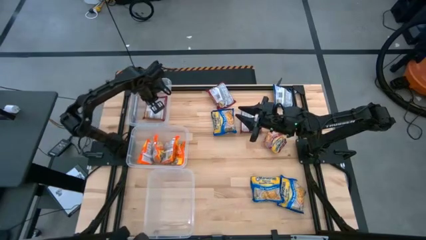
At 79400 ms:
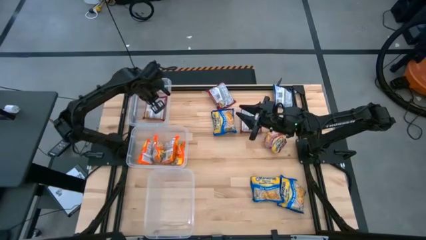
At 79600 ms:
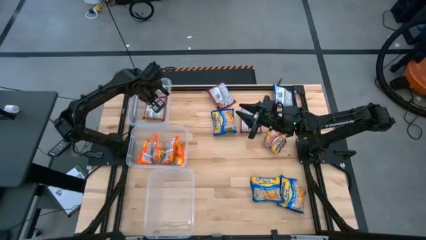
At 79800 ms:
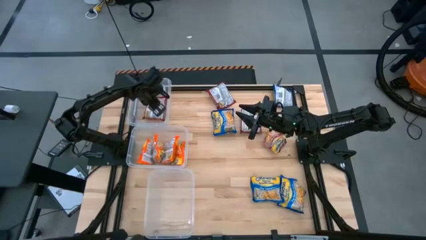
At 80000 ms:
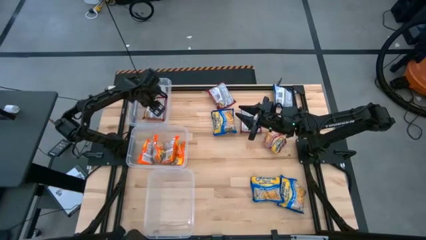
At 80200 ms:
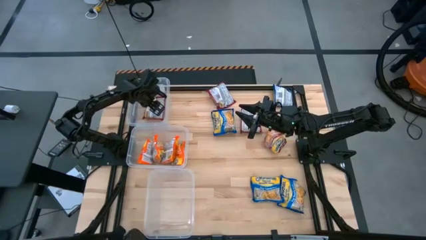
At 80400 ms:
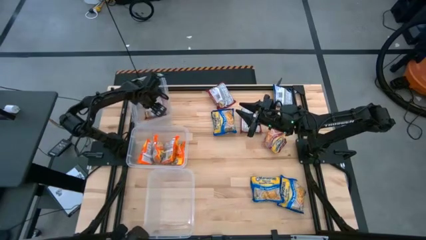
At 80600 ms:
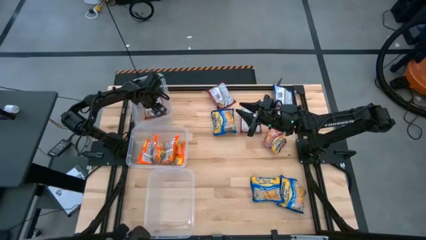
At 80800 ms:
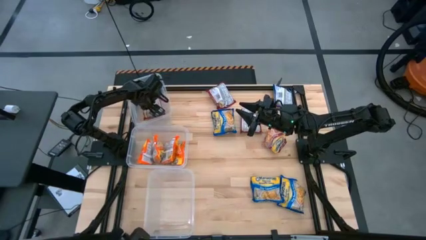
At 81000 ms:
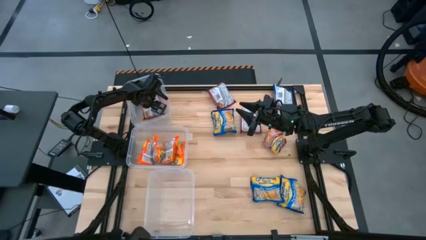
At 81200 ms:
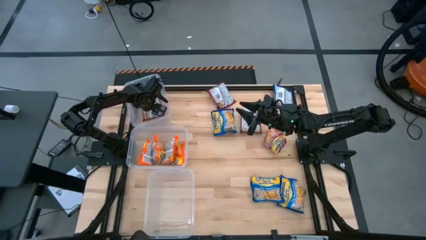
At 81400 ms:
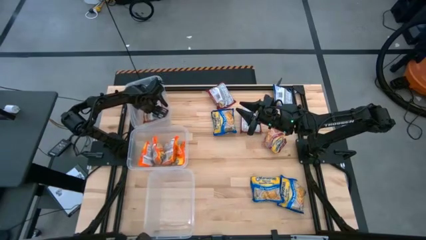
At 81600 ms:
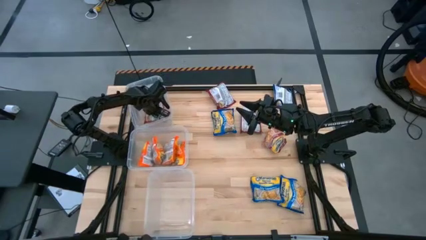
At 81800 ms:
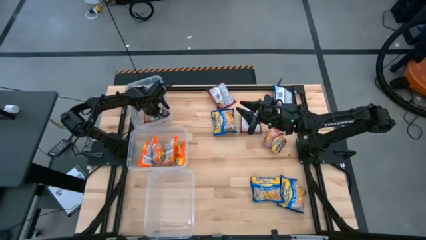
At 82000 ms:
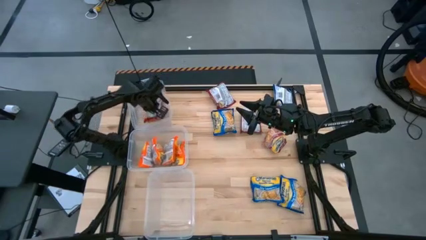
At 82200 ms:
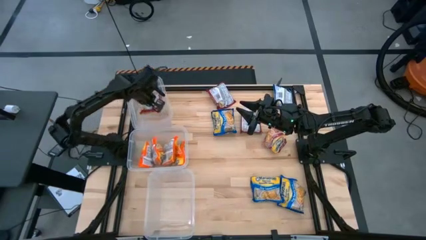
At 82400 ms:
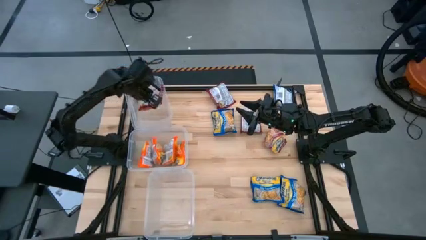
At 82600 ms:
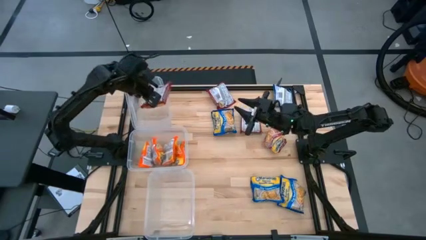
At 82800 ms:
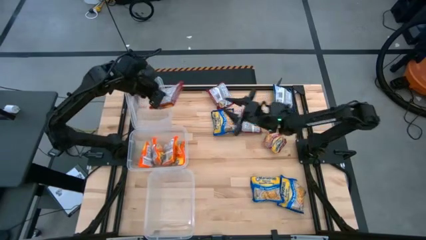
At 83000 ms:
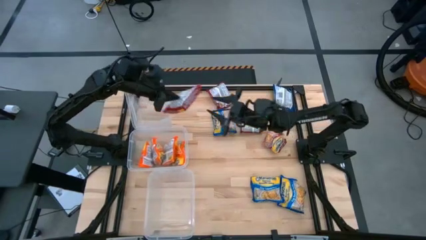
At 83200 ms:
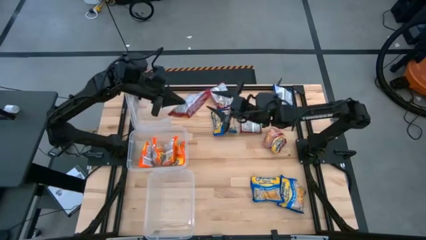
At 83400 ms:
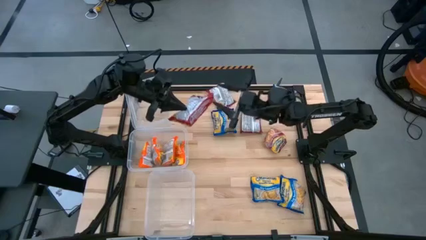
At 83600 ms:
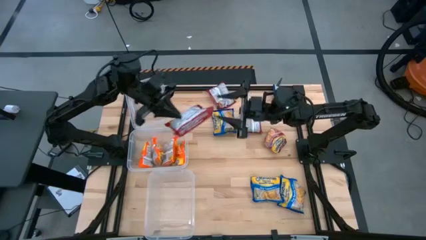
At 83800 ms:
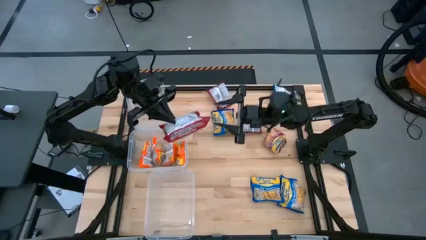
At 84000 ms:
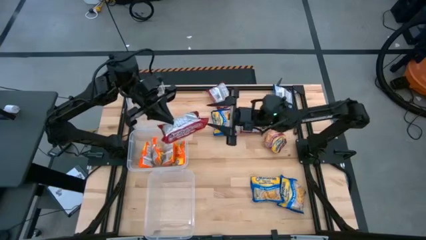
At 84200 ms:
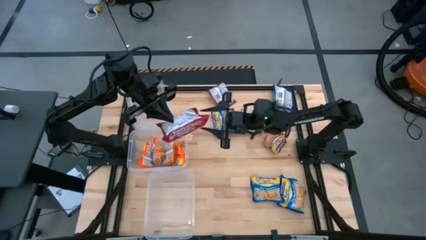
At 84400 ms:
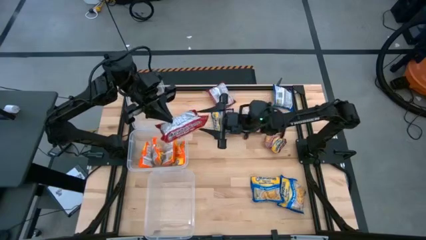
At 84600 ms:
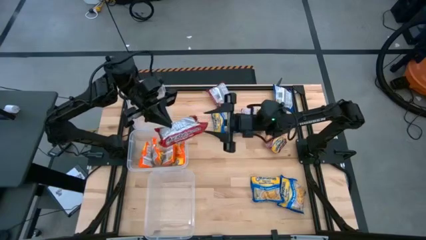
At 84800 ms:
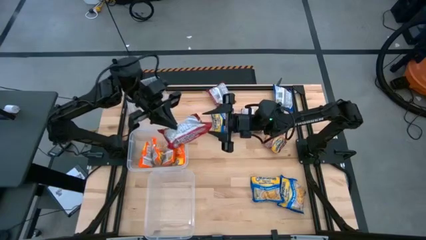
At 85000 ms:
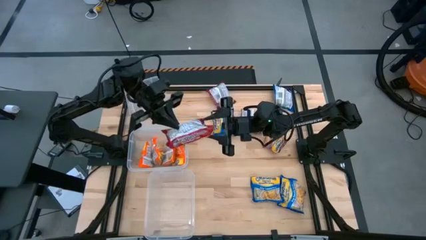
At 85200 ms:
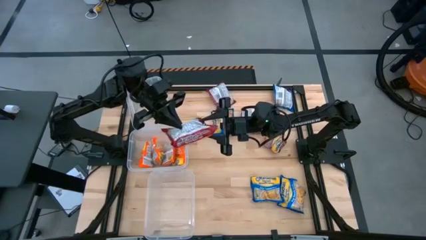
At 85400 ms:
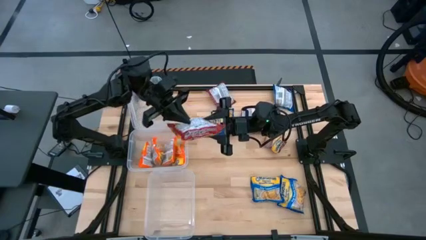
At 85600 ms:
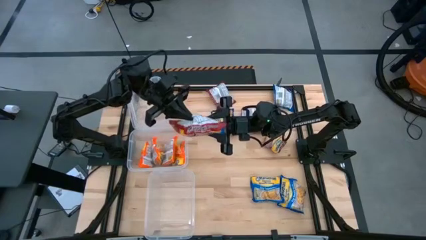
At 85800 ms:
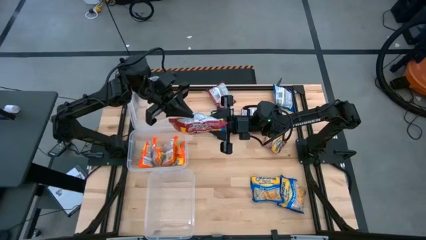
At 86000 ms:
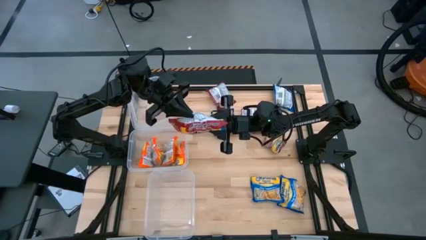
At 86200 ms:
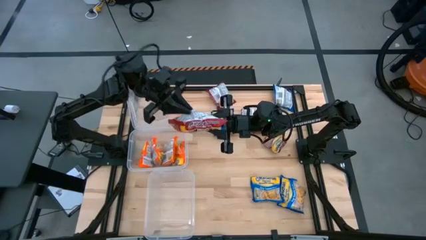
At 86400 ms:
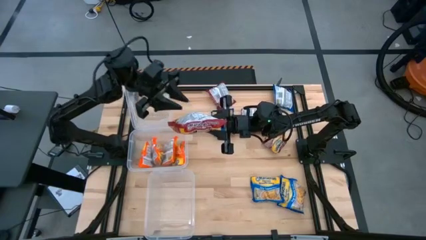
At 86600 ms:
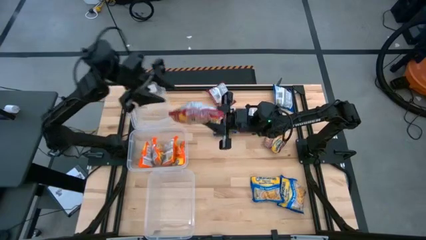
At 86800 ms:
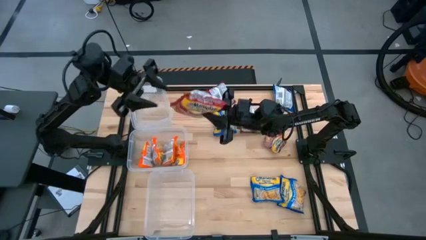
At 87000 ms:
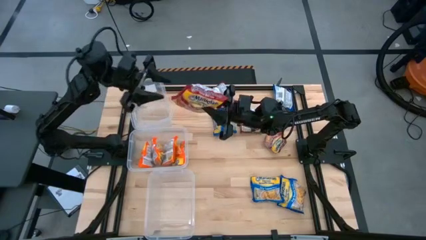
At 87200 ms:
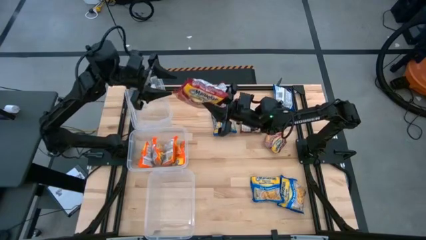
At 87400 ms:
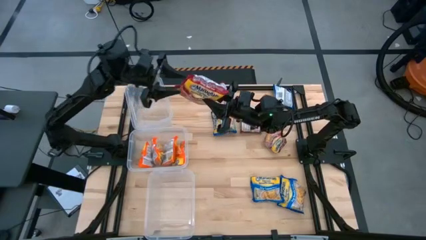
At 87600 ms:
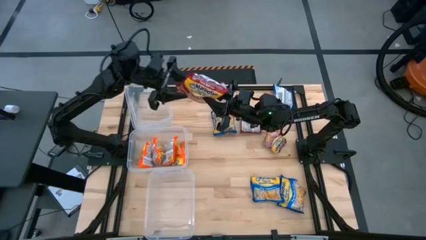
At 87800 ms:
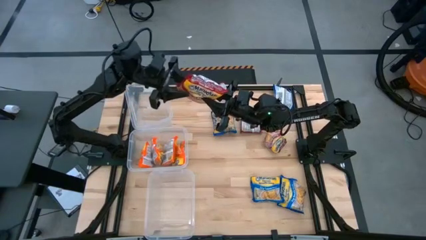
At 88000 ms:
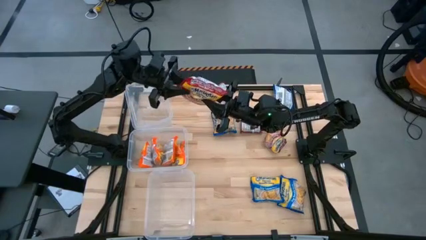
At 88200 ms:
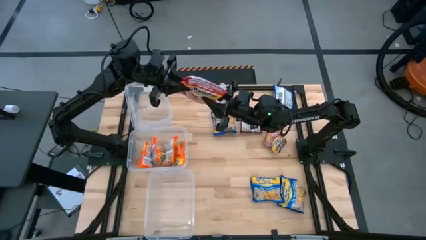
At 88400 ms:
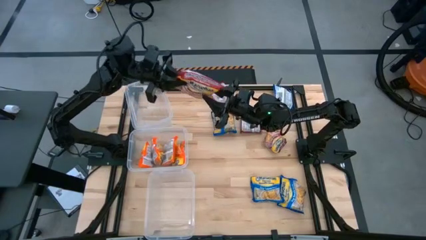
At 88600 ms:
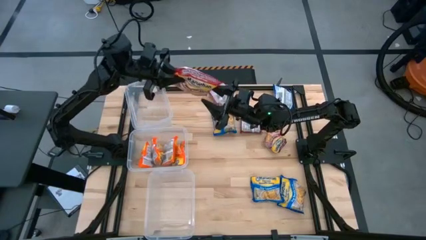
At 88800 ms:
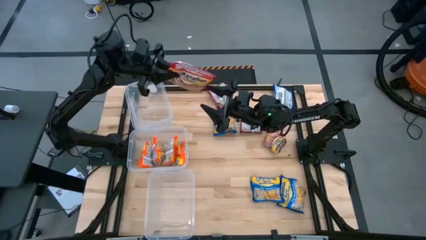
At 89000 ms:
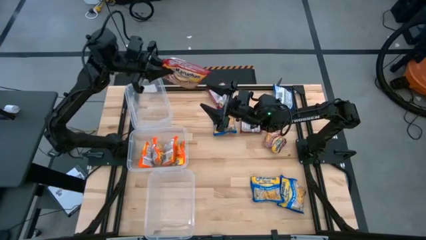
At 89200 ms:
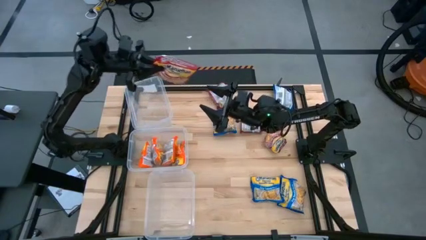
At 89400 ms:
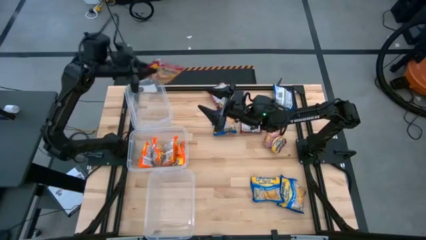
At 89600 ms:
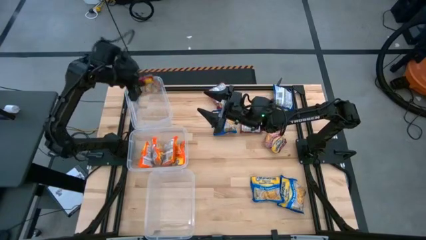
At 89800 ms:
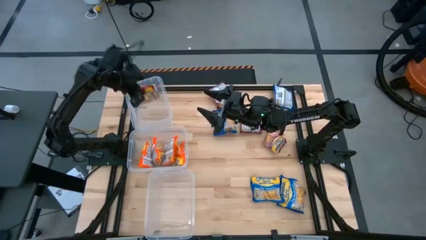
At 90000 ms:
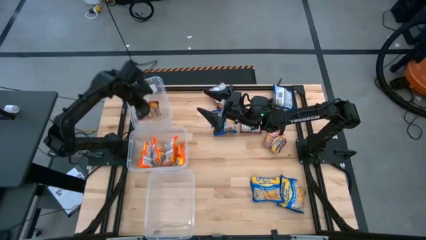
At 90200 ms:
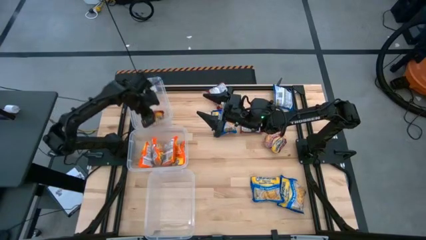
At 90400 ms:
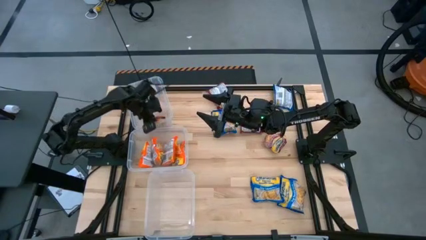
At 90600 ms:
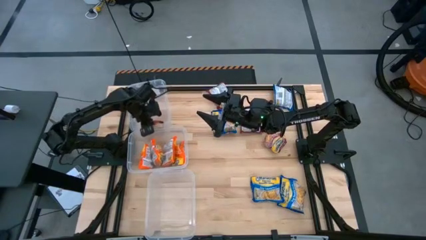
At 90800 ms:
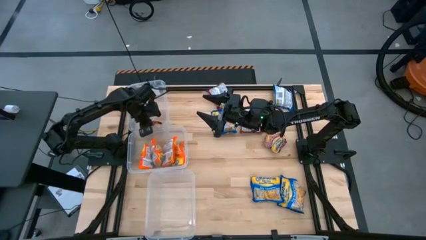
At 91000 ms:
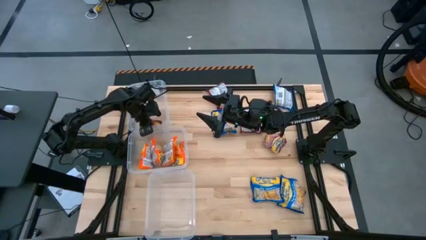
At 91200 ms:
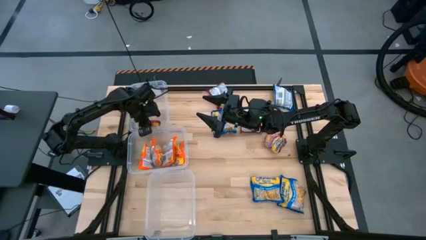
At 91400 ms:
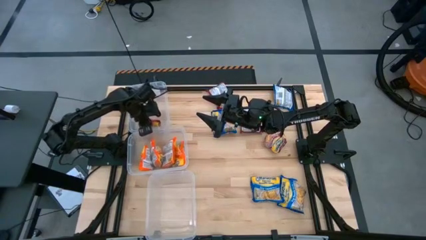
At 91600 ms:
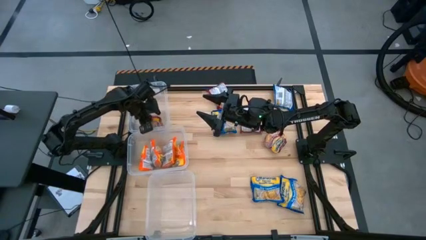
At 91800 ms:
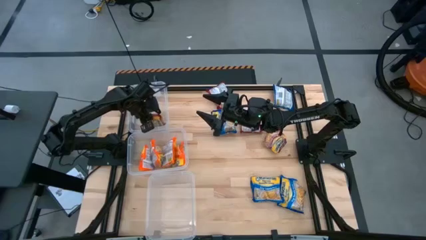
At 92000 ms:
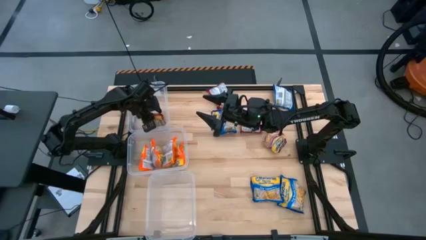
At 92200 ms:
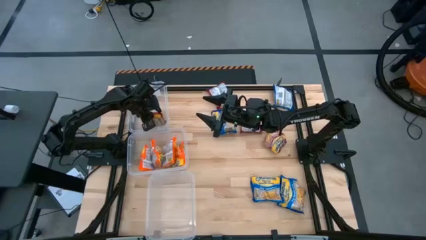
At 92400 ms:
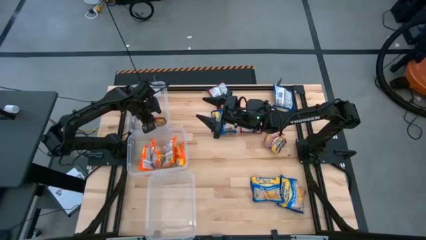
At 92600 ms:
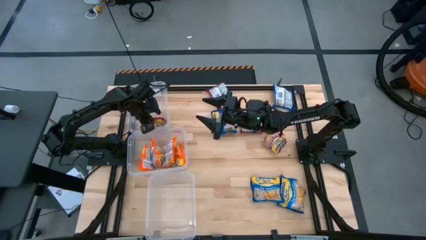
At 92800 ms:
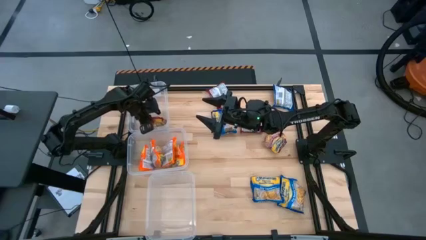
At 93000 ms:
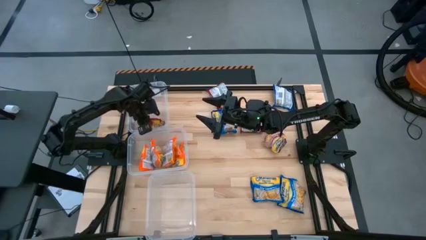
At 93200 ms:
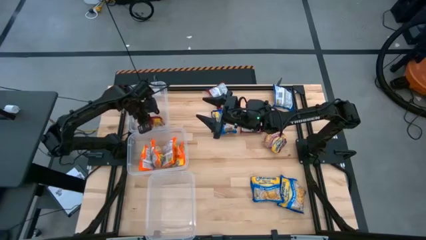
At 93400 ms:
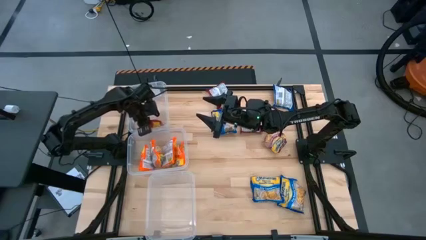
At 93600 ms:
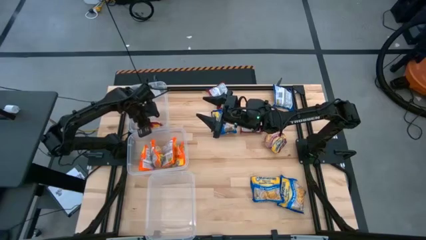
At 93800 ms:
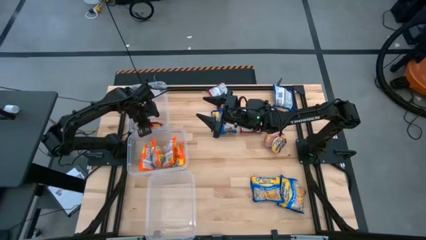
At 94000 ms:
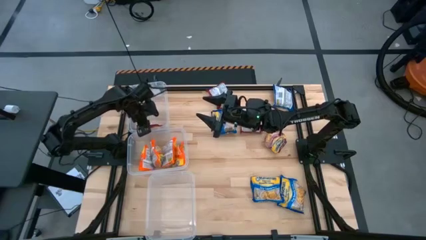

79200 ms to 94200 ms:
Task: Sort Maruchan noodles
Adjust the red noodle pack in the top transparent bin

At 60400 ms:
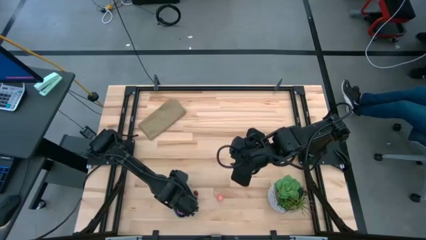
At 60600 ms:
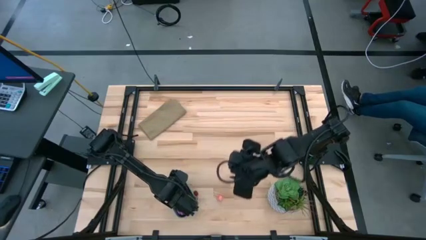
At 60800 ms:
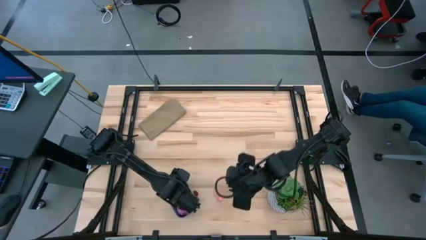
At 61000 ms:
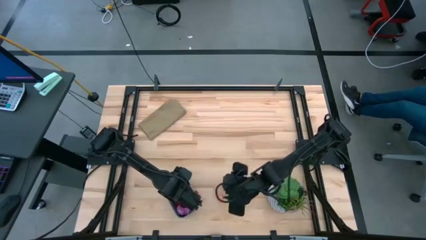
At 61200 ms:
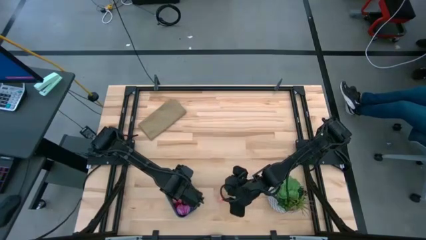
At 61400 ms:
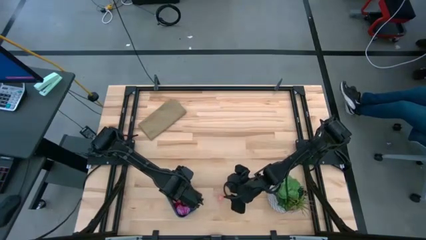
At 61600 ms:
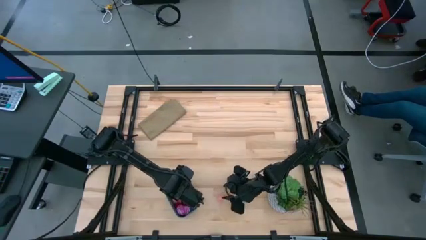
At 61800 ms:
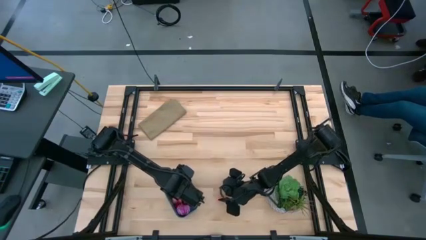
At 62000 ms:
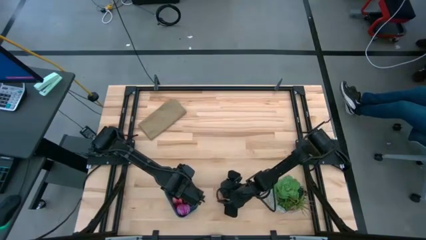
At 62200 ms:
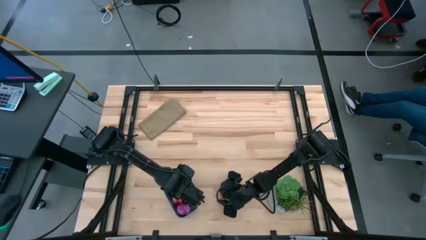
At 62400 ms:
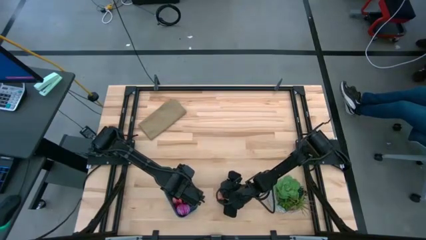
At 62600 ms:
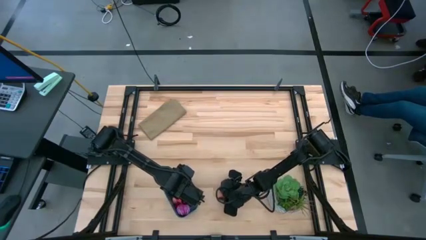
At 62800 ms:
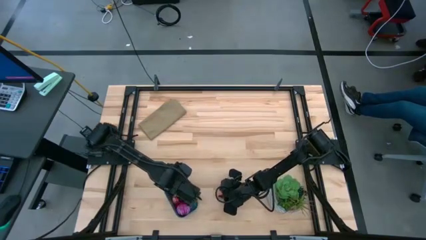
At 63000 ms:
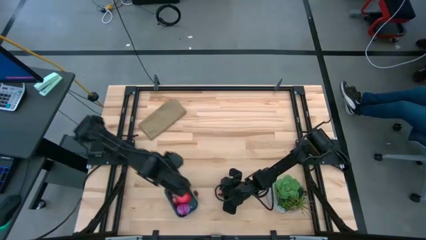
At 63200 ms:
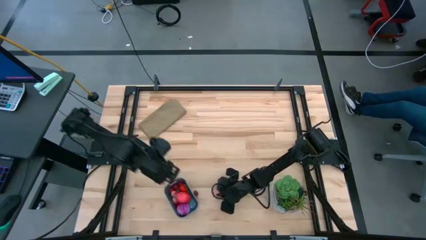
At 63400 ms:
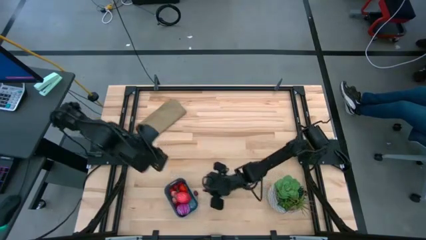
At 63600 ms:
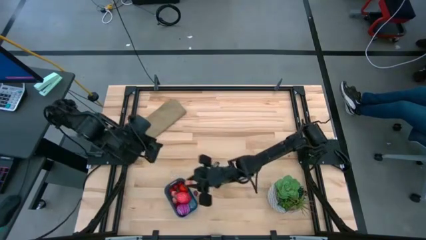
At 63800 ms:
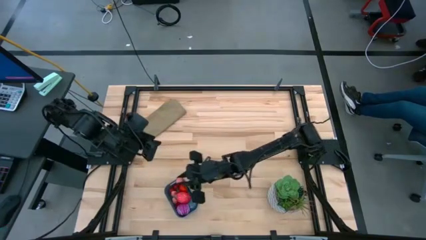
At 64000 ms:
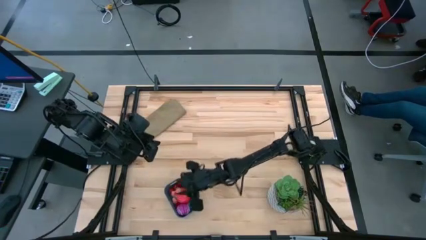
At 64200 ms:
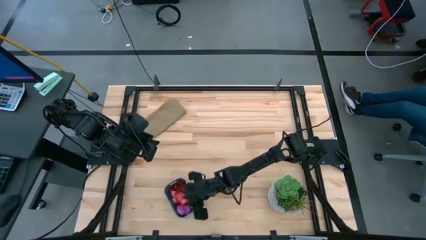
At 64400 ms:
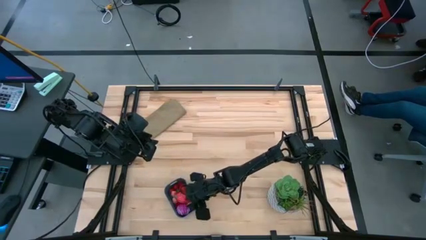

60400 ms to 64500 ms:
Task: Pick and placing Produce into tupperware
Put the pink peach into the blue bin
